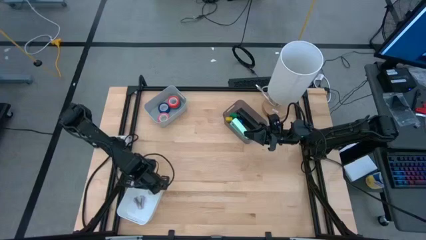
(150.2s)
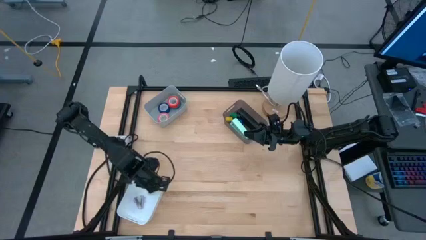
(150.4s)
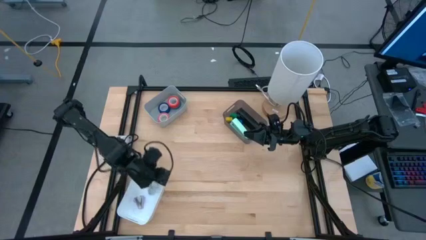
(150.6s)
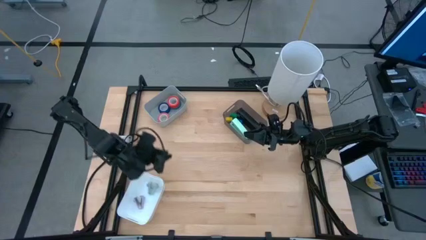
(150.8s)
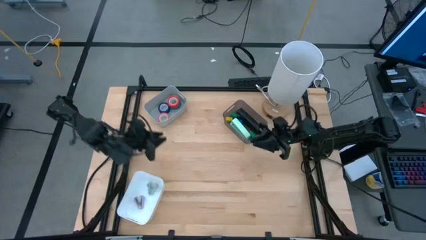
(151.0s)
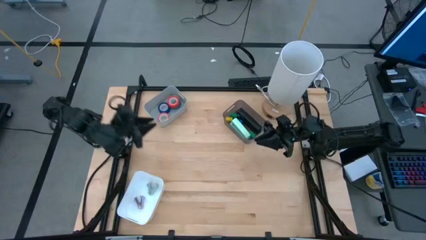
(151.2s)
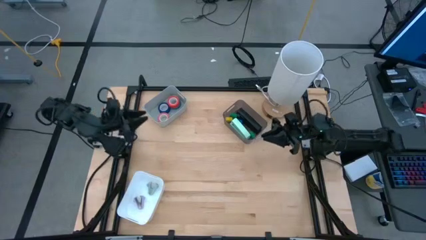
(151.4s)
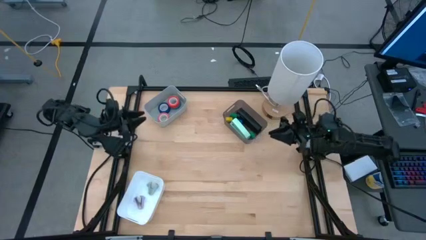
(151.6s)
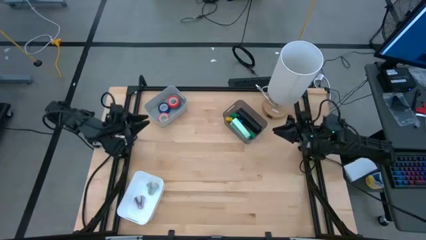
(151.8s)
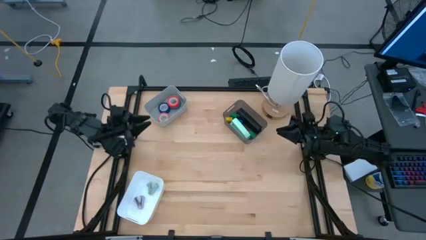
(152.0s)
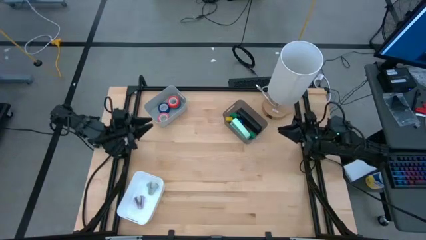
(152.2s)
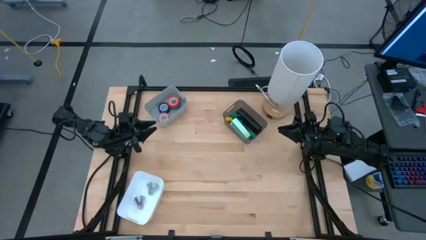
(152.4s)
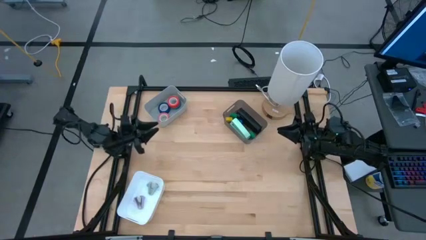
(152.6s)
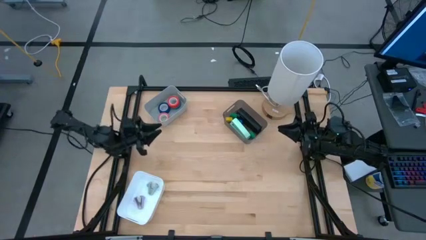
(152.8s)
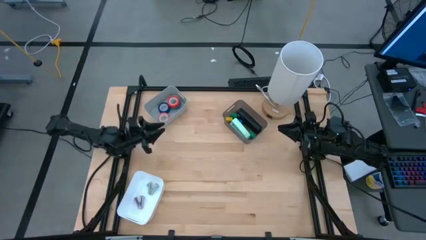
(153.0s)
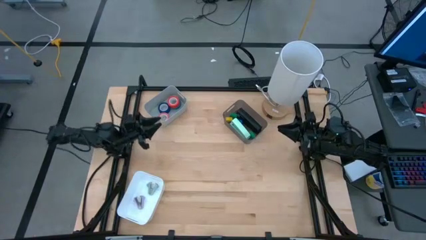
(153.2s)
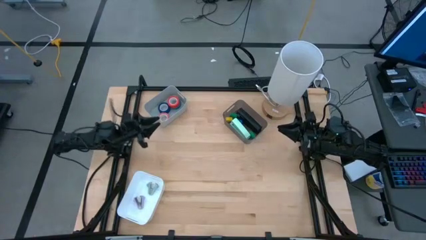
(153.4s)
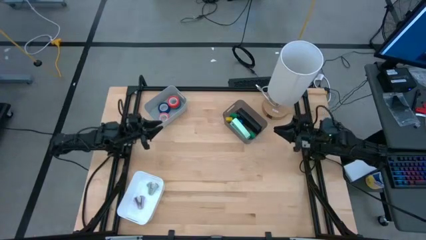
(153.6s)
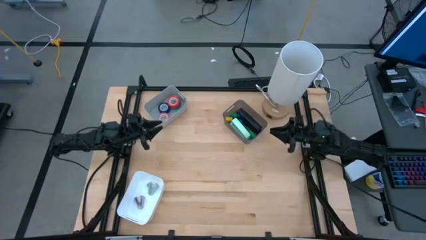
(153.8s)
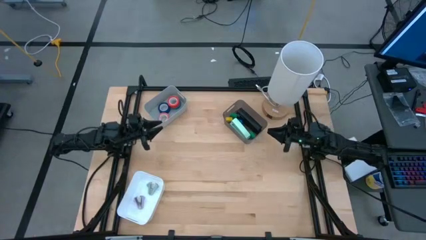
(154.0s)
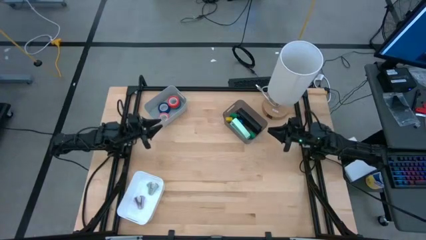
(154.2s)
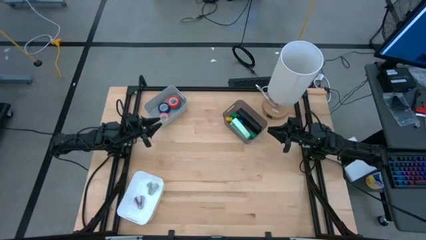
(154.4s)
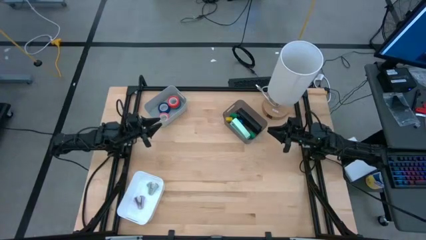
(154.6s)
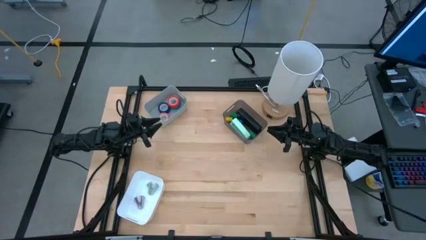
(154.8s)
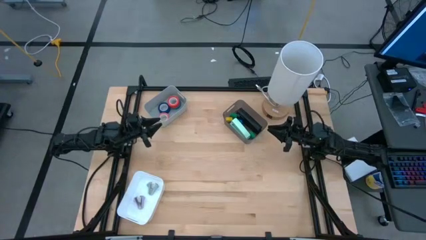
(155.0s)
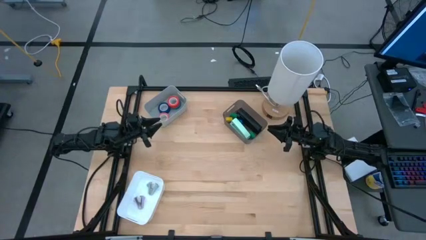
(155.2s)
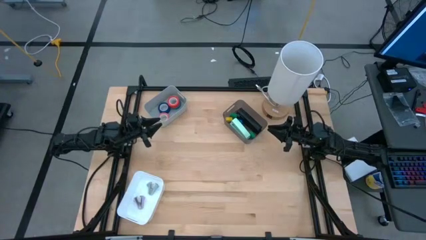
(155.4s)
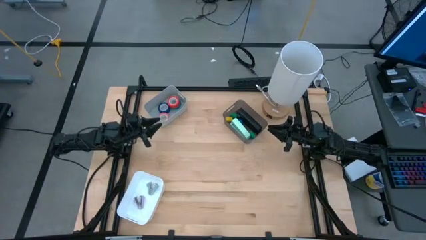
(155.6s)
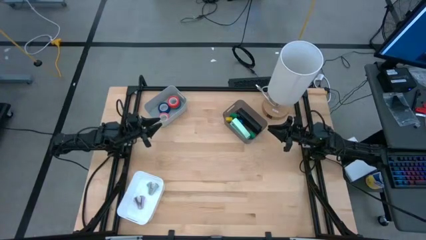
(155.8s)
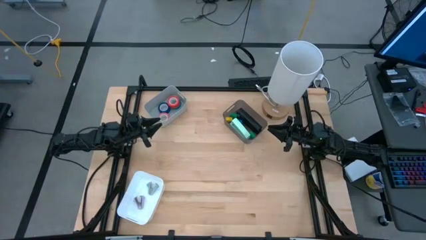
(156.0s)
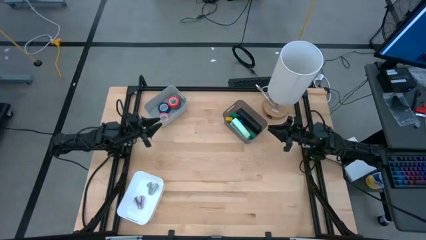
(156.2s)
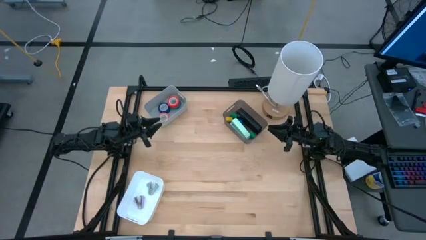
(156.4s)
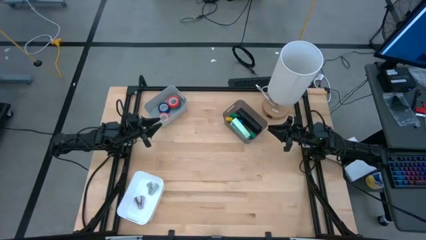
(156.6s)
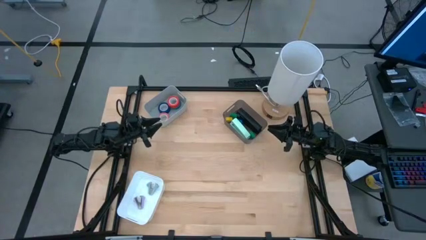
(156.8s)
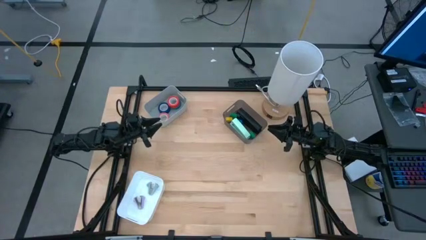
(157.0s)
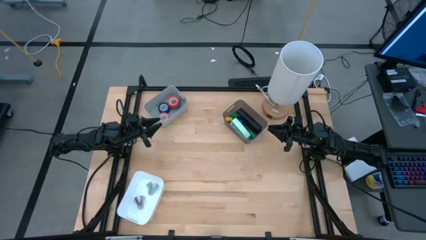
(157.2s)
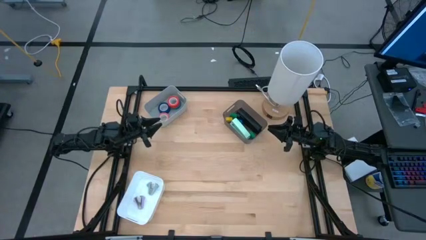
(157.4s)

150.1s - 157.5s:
Task: Pick and place Stapler, Stapler remover, tape
Return to Home Position

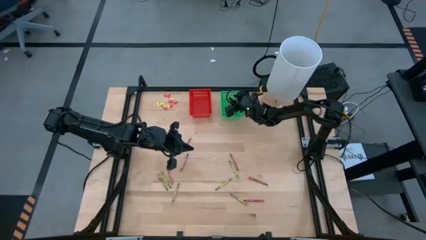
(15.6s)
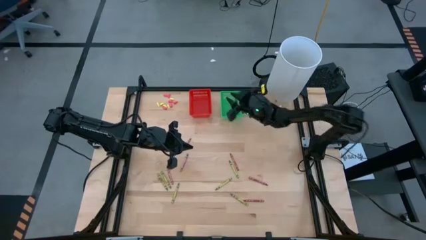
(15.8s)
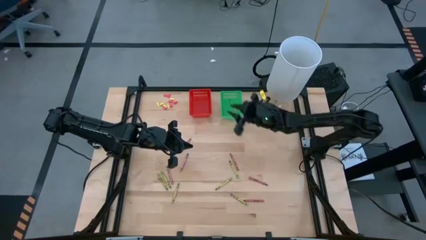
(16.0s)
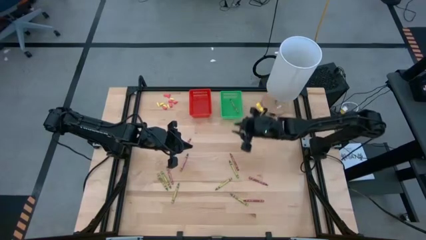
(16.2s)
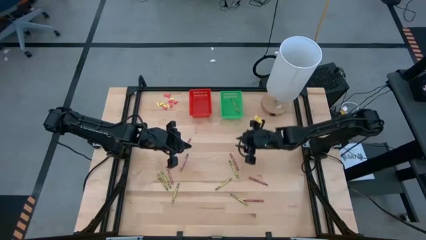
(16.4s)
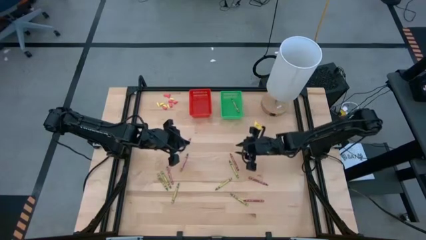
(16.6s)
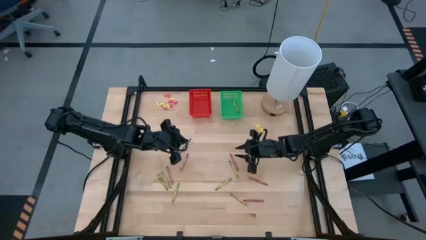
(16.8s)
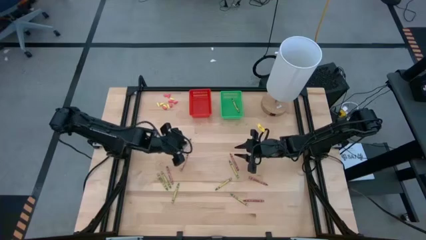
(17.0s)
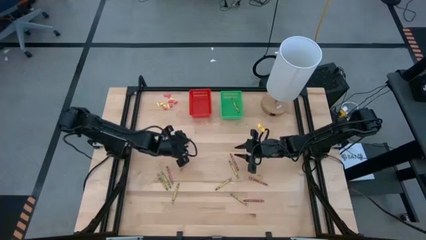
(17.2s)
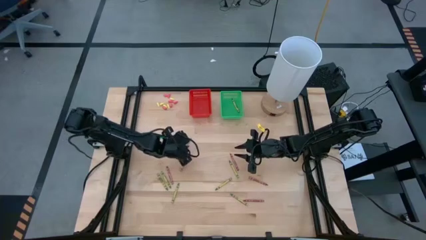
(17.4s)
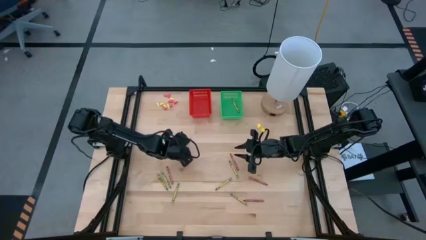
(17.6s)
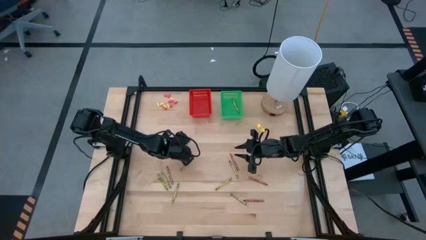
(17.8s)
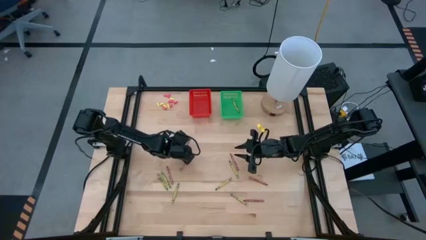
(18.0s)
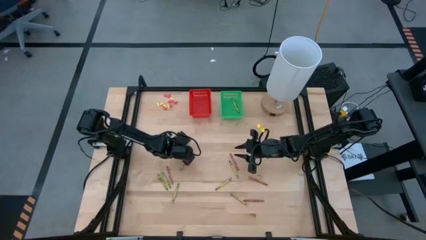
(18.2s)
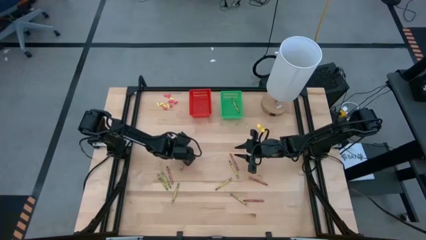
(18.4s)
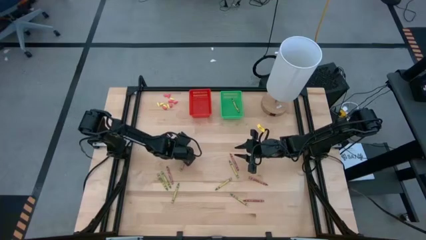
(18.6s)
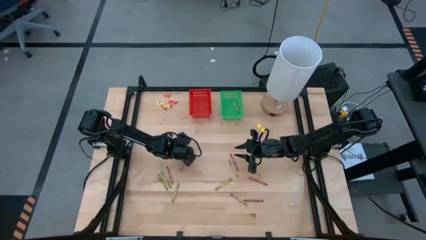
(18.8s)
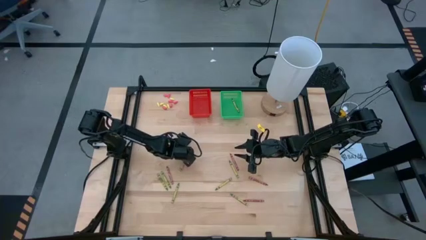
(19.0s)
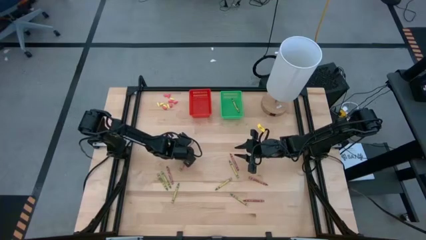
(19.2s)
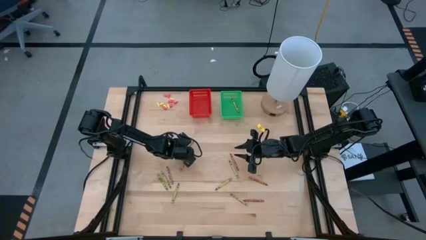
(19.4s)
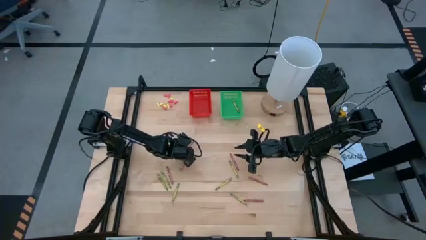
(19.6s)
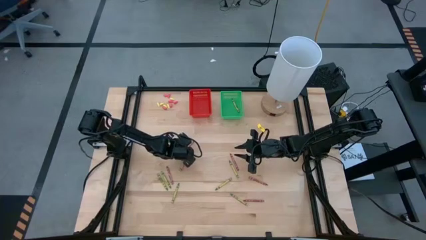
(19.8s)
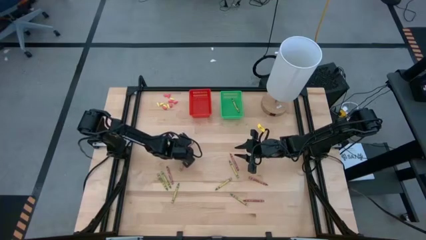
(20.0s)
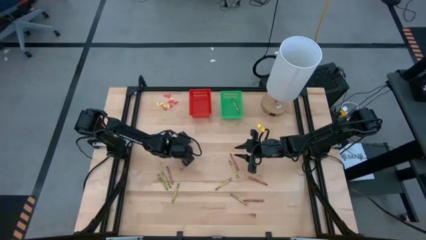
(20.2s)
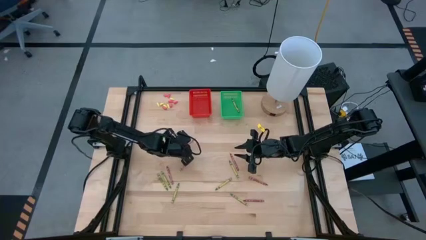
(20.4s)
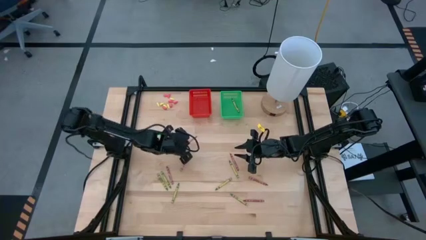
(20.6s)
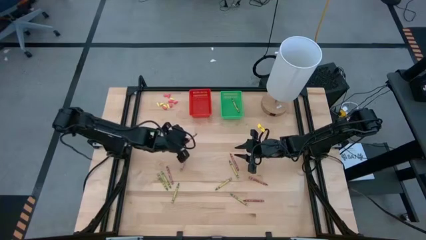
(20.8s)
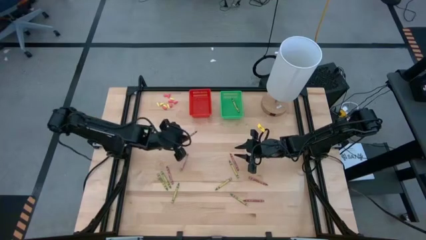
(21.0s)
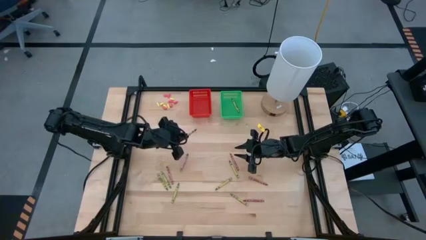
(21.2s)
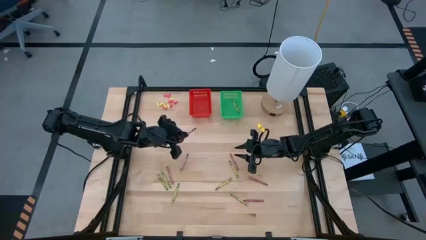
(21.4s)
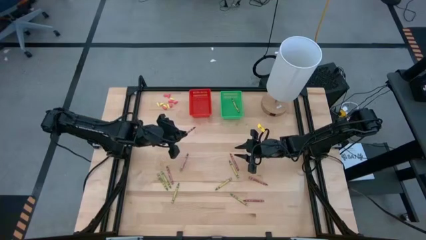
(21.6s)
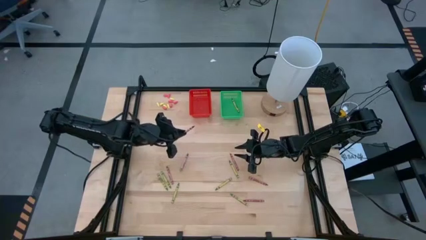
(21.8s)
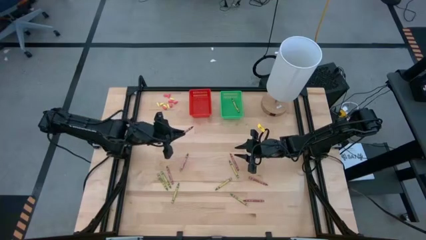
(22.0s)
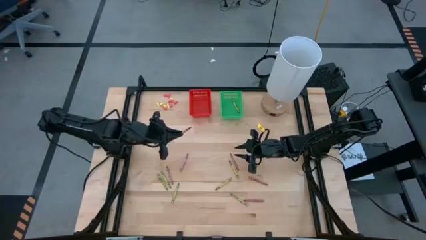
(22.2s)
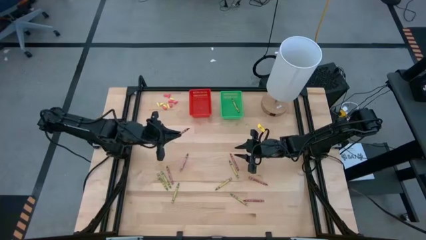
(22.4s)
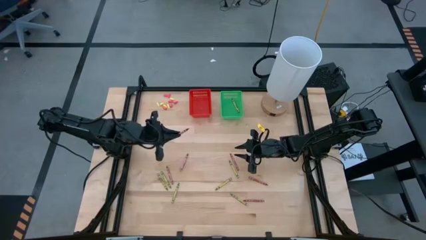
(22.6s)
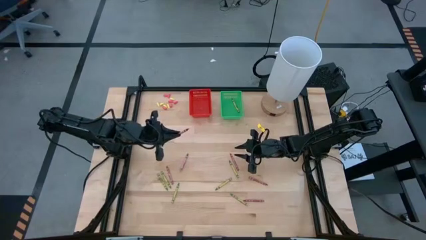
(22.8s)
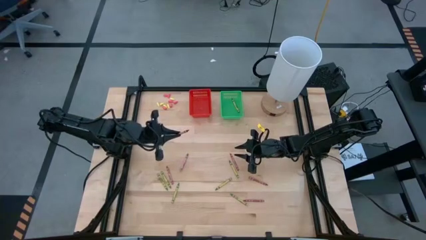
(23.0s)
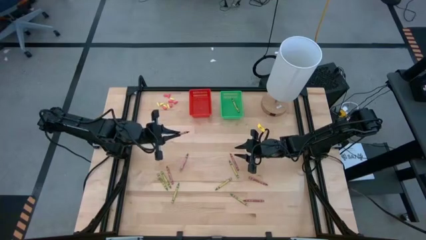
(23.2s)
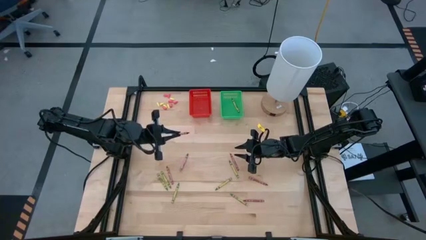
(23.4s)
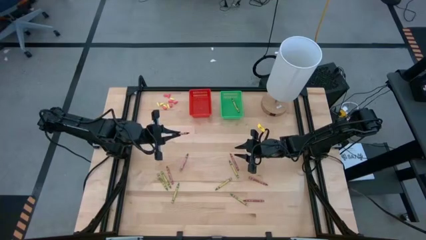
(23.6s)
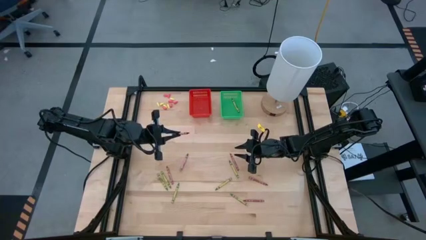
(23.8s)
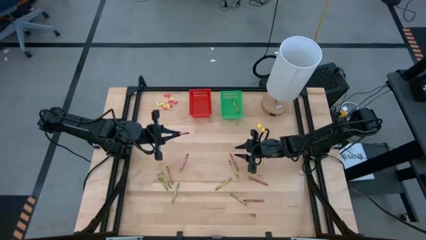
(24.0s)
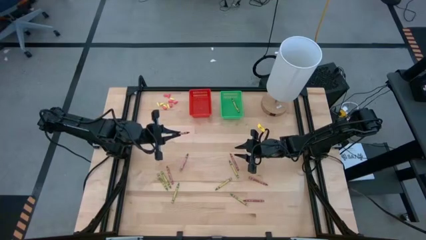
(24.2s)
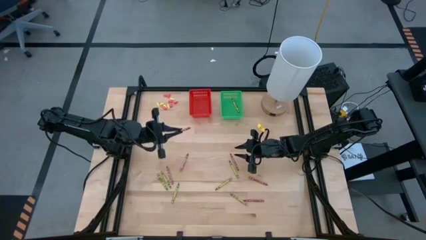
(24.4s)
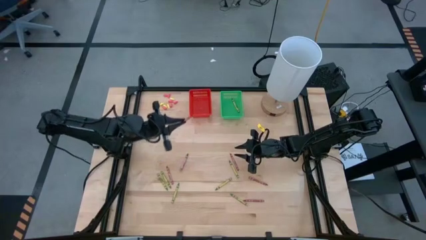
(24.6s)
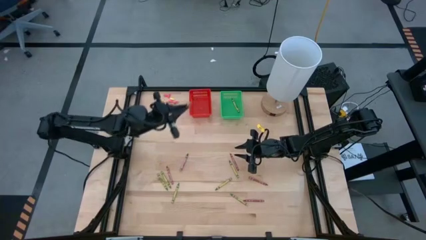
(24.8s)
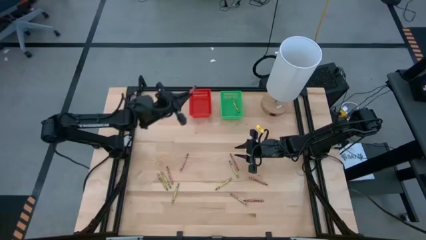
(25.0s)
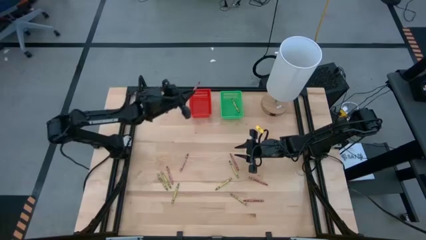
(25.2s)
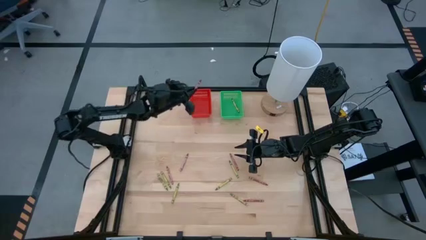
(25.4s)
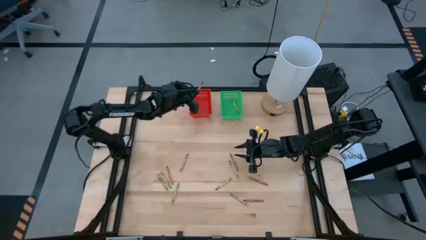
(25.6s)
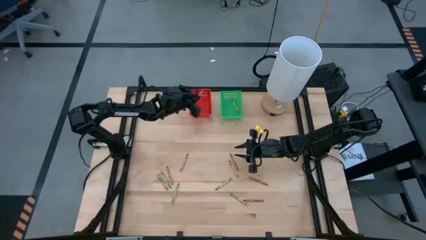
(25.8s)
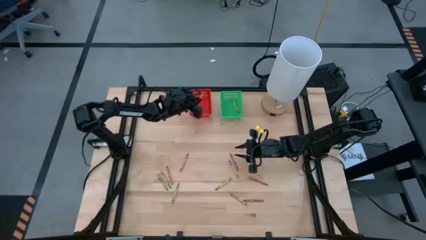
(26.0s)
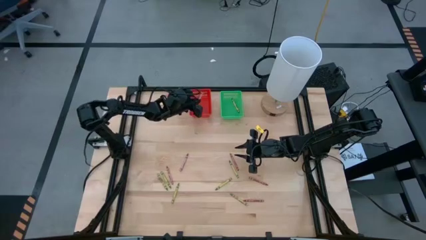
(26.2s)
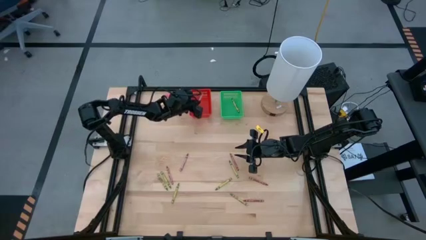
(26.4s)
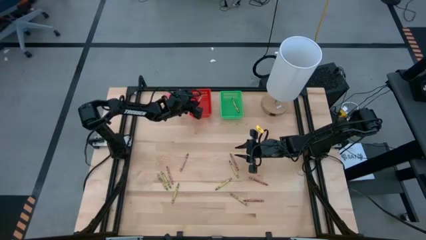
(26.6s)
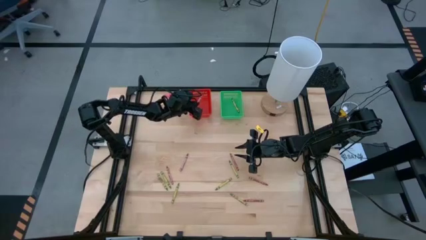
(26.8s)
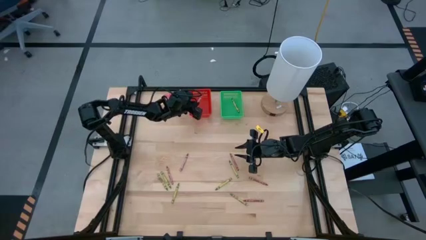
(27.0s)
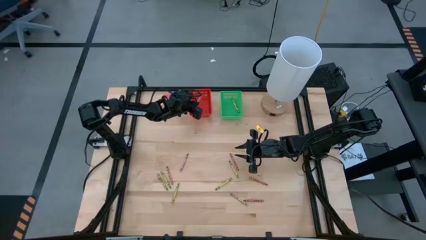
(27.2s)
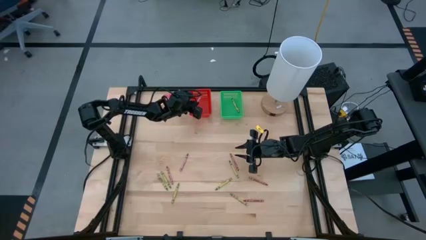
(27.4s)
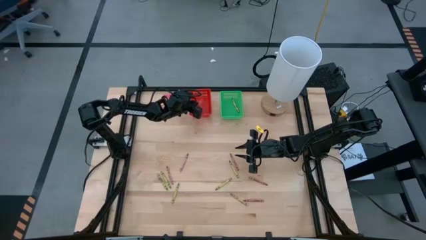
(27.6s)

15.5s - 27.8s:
Task: Sort crayons
Put the red crayon into the red bin
